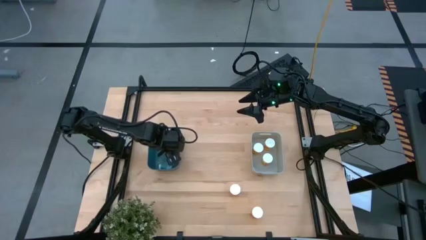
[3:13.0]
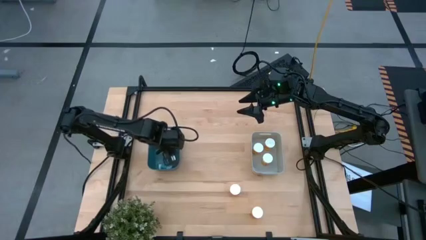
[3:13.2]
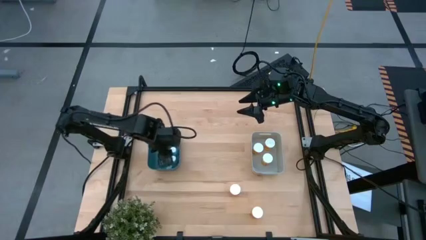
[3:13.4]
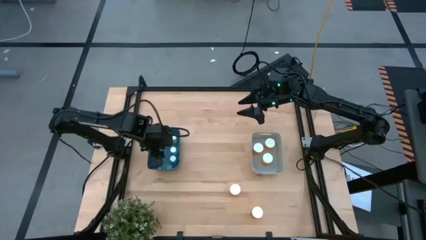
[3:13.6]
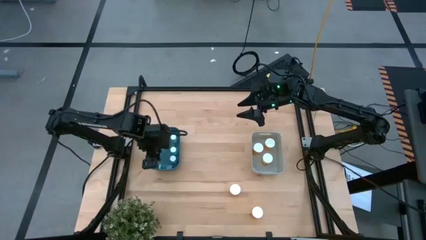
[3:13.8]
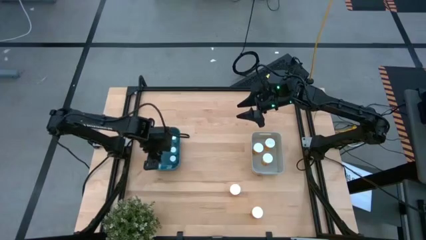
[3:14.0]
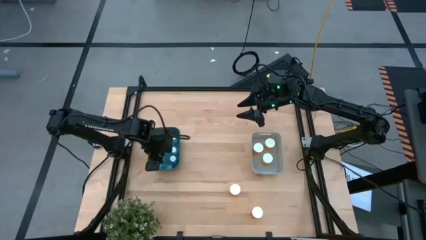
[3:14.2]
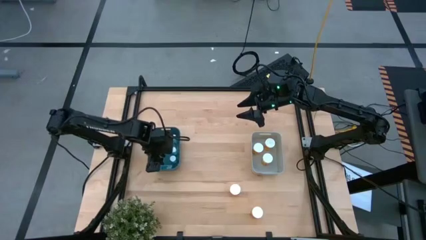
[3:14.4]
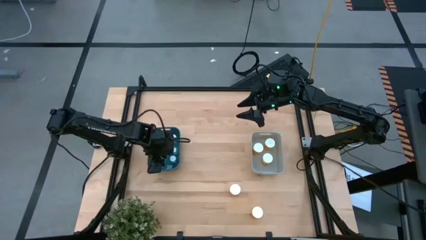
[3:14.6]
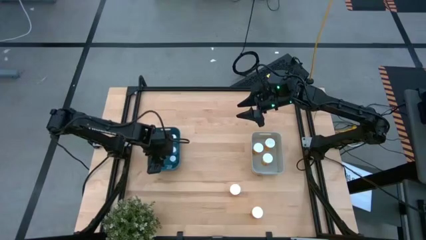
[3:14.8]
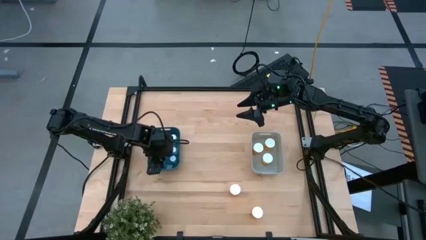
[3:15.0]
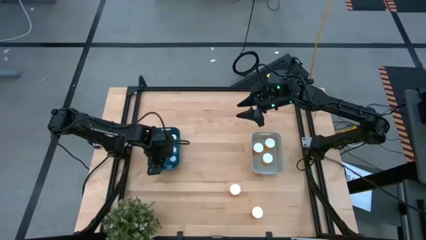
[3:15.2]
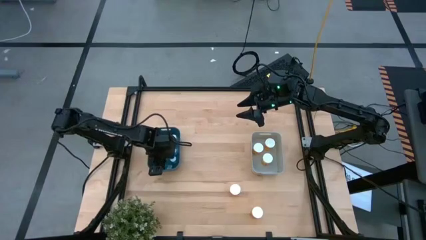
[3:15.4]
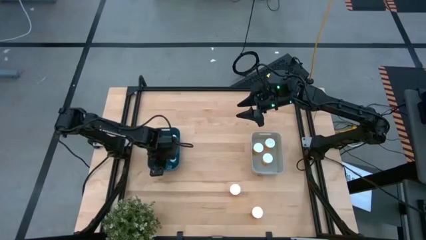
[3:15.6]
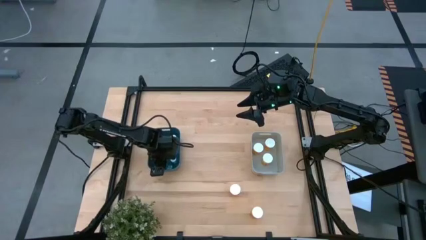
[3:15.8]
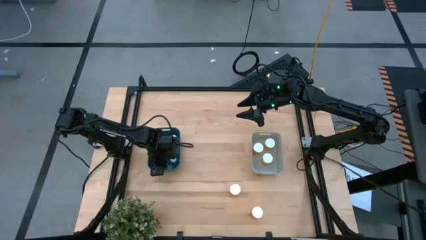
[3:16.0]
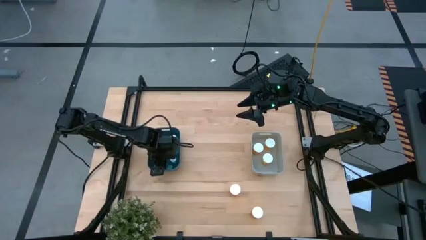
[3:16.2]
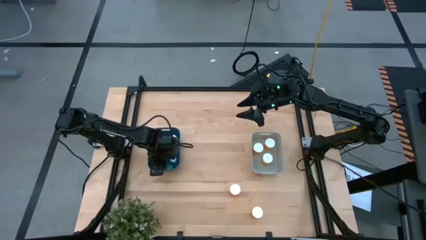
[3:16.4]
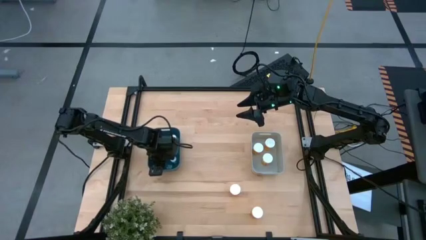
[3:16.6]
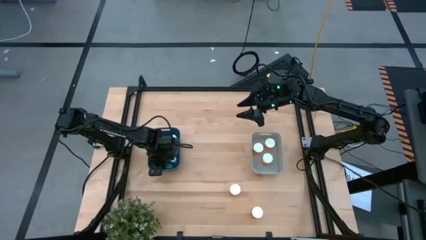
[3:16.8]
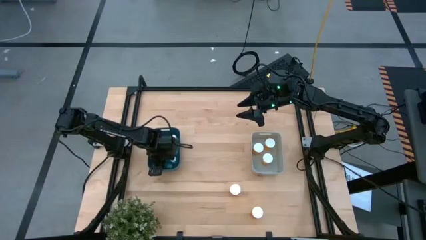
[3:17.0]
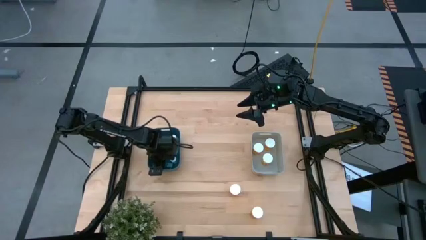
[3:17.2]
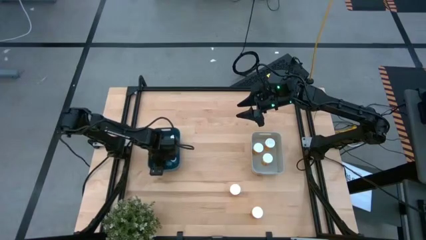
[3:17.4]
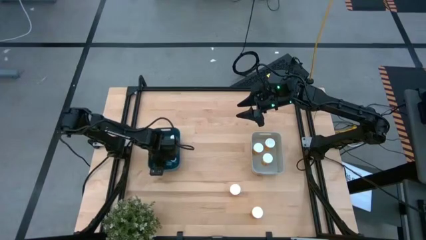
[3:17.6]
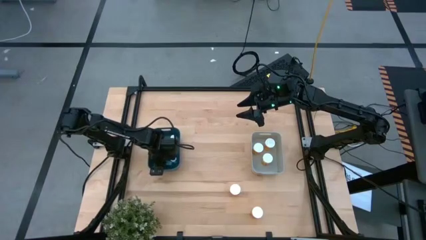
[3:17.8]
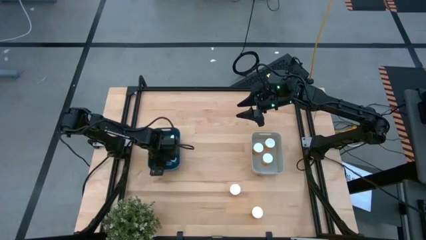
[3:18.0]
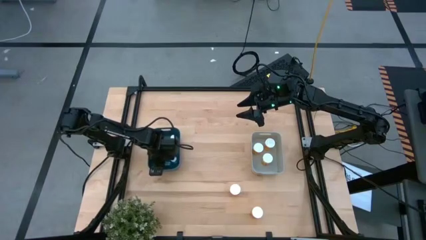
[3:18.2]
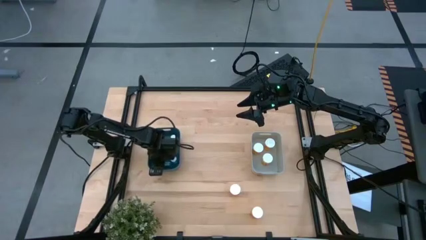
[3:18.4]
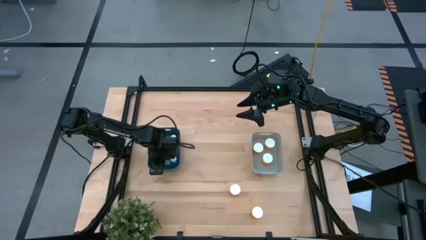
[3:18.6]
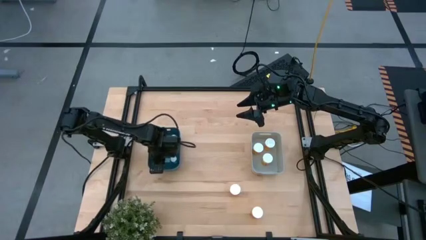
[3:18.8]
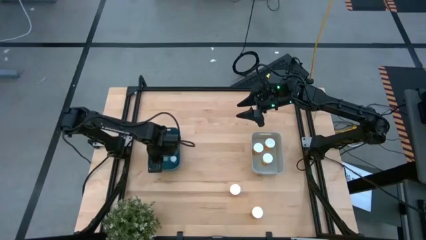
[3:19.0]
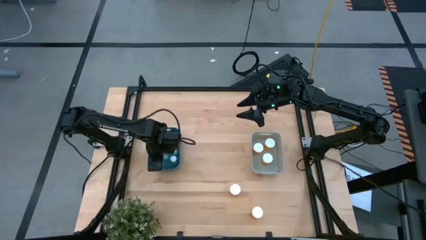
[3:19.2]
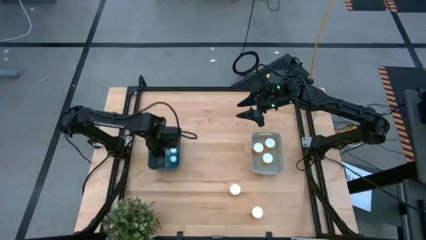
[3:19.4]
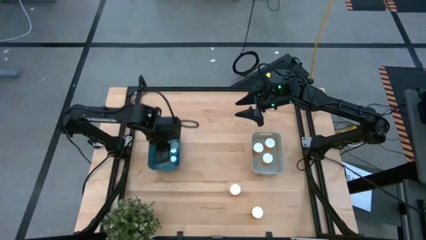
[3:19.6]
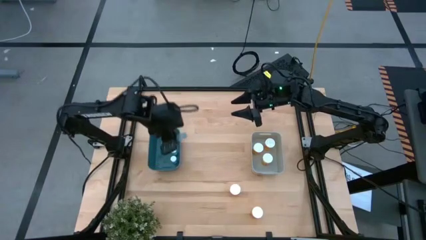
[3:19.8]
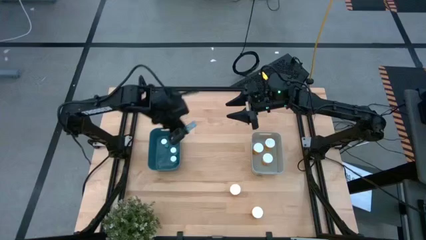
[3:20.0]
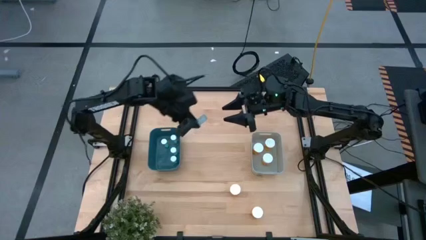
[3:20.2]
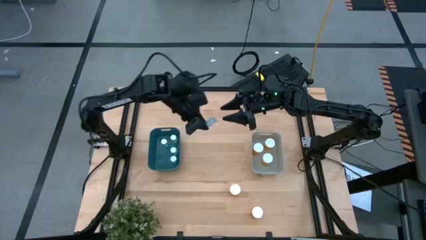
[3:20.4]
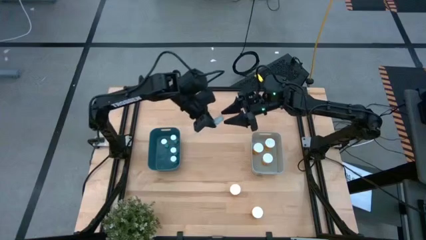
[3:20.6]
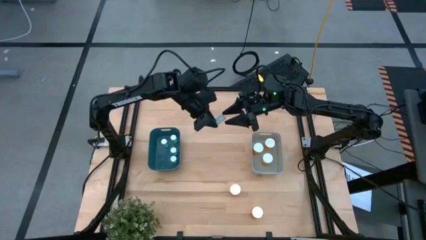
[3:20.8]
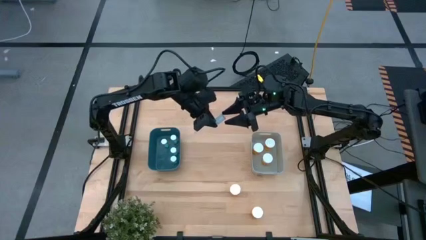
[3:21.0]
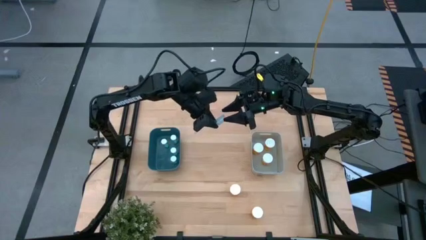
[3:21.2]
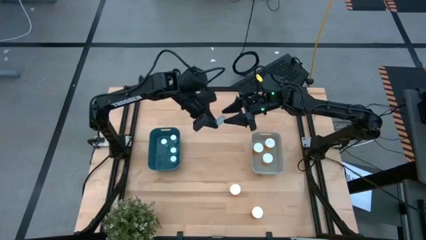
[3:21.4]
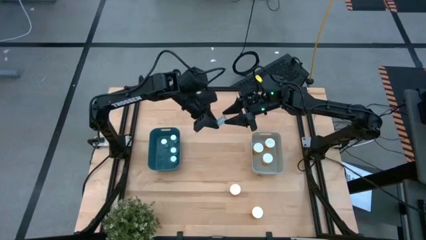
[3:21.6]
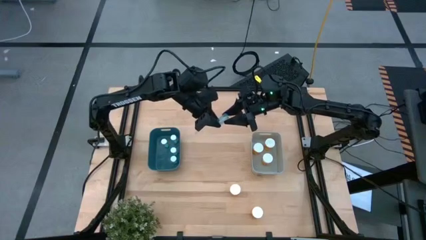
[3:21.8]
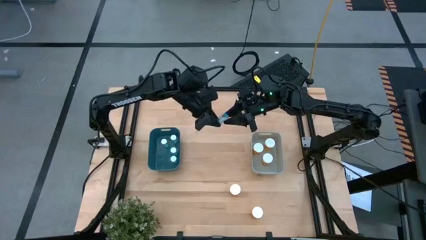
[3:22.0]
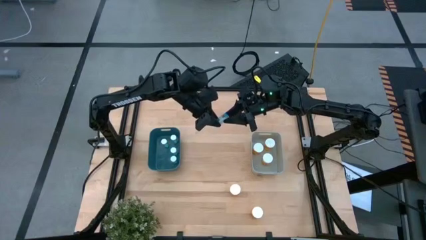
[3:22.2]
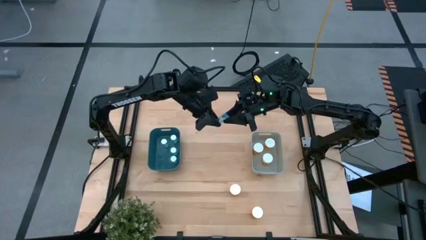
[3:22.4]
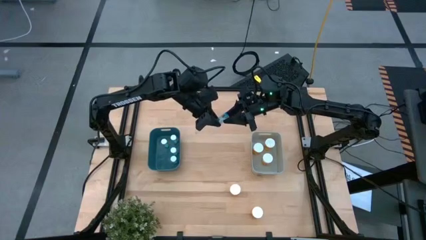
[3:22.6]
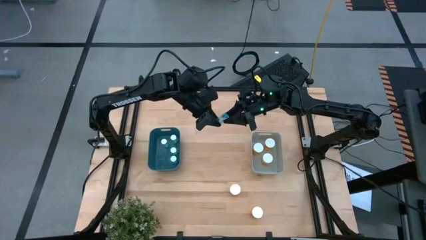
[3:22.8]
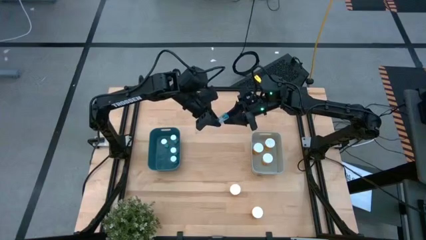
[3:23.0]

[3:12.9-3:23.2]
Task: Pick and place medicine bottles into bin by pill shape (circle, oval)
Adjust the blue pill bottle

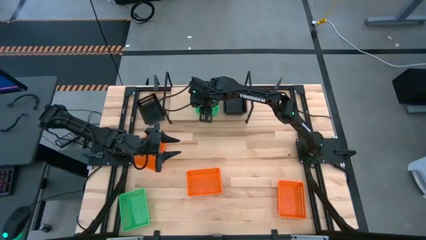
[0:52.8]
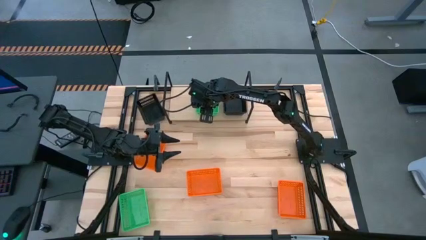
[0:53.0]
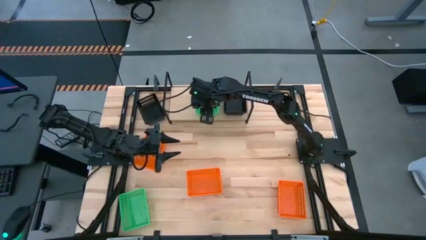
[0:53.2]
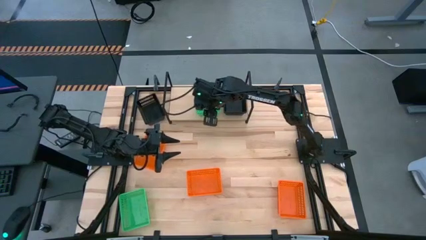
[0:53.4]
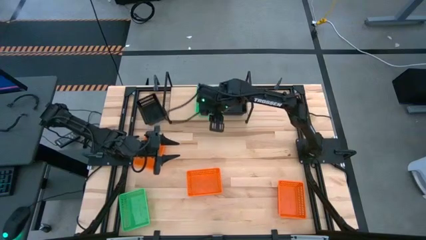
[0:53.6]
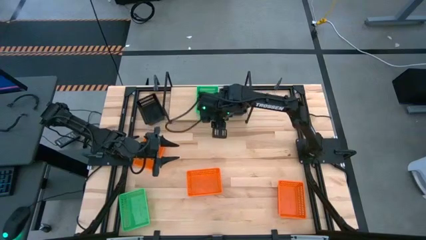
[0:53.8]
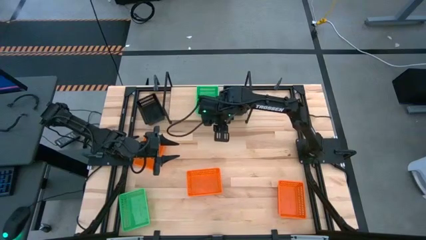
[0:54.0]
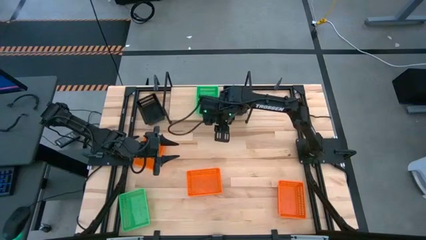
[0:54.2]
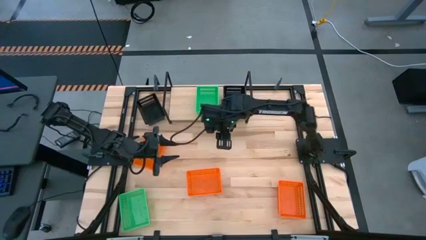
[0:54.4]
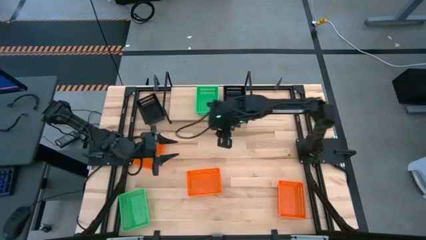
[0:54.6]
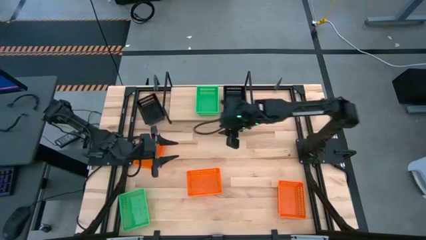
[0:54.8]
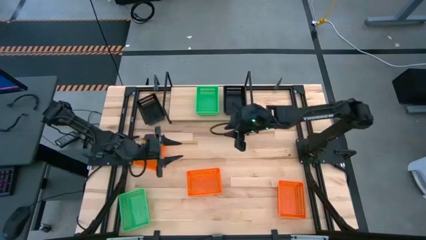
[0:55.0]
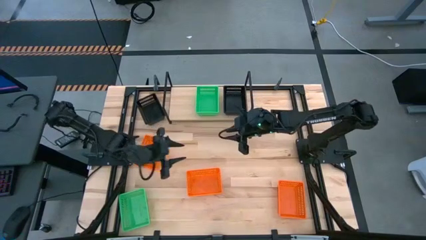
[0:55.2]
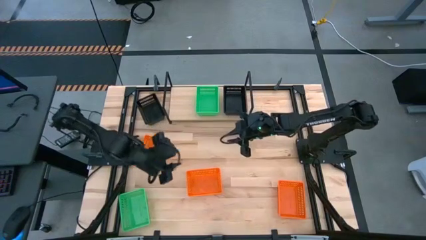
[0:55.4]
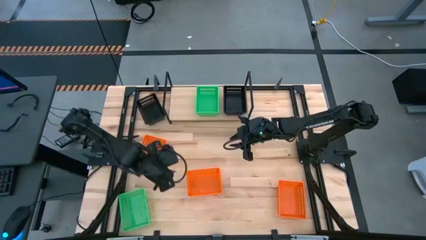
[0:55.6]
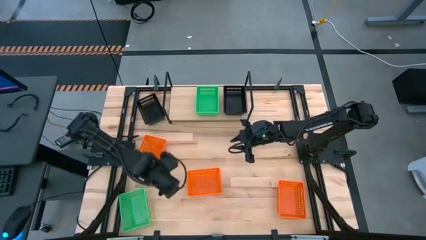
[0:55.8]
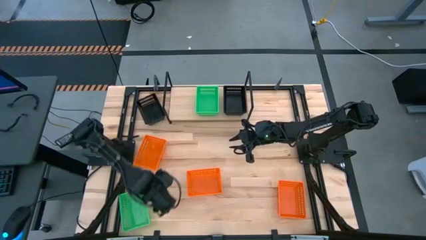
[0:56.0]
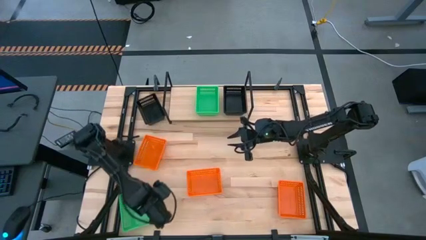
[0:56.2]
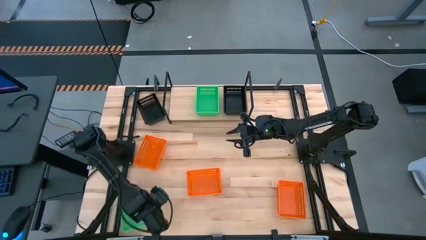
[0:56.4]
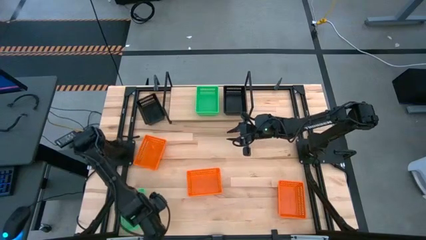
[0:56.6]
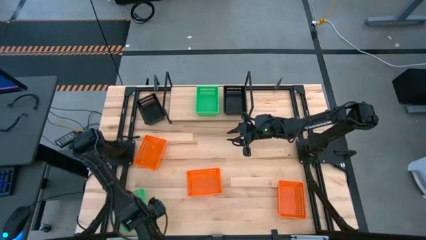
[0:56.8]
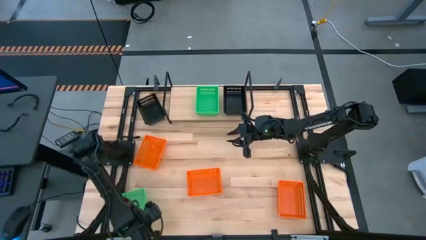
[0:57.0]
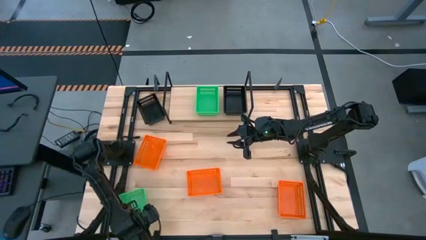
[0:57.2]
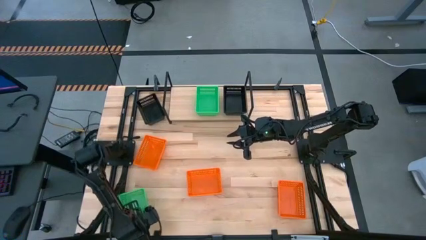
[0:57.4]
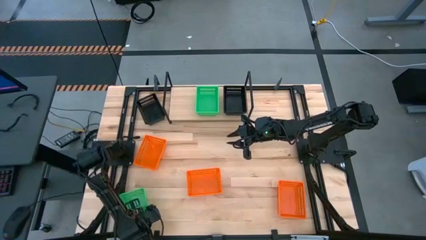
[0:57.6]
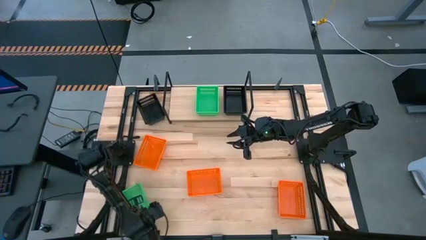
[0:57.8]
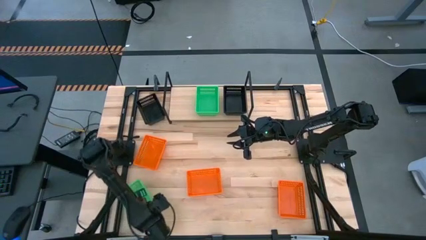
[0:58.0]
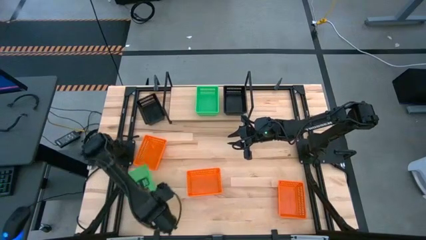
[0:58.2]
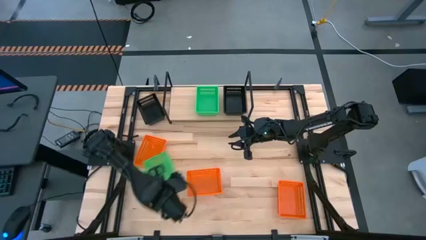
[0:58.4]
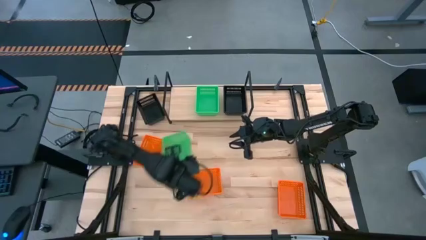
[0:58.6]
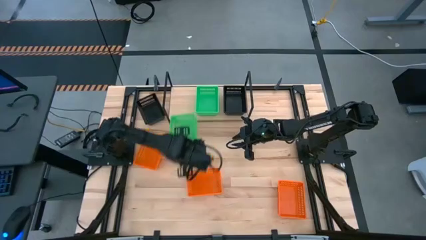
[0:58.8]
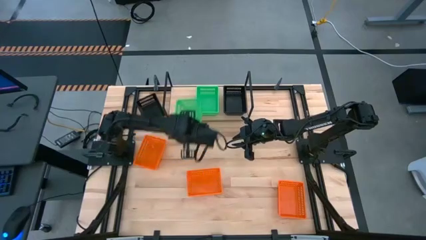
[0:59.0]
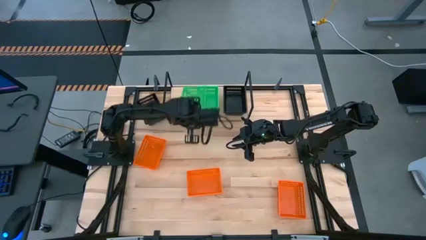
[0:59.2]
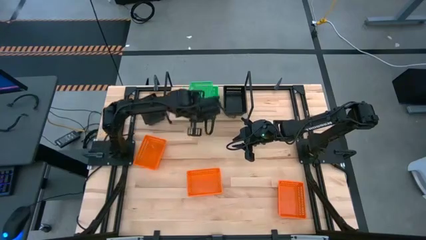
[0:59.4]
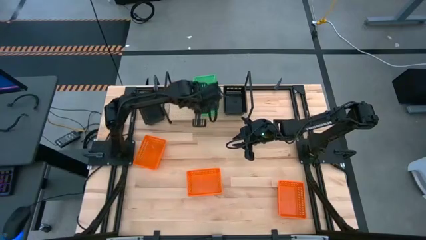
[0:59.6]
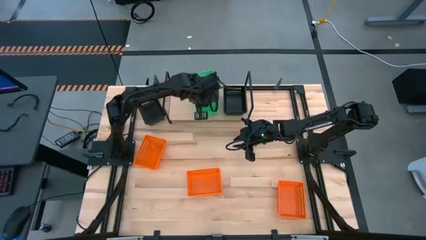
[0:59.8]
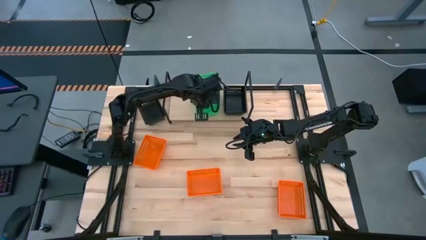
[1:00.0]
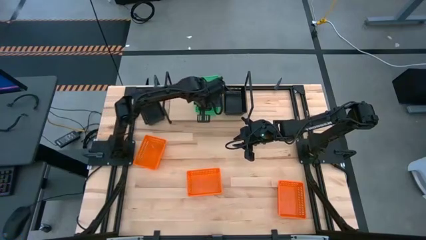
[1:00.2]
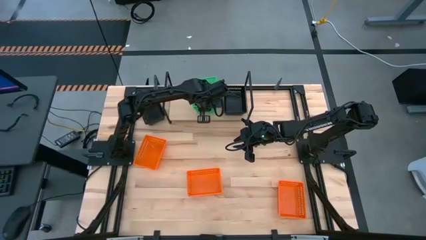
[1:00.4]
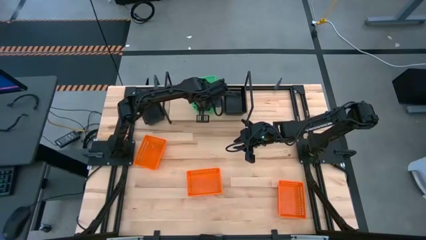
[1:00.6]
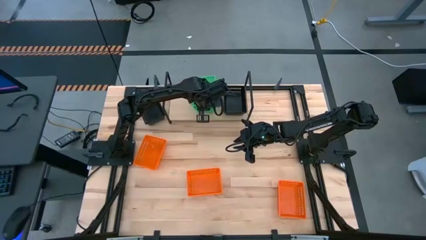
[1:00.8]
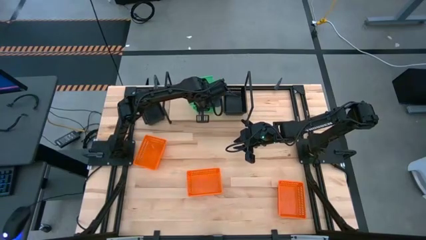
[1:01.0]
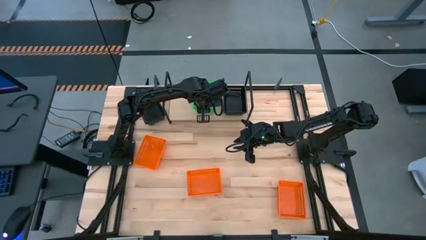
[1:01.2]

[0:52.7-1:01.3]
Task: Stack baskets on shelf by color
Stack the green bin on top of the stacked green bin on the shelf
